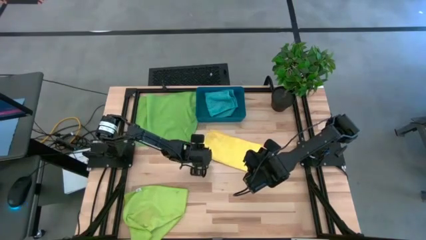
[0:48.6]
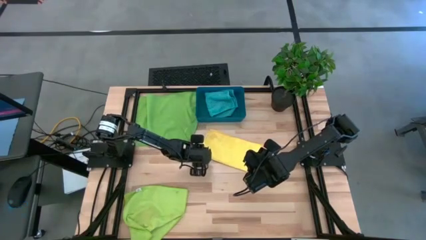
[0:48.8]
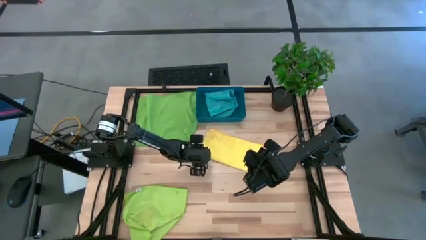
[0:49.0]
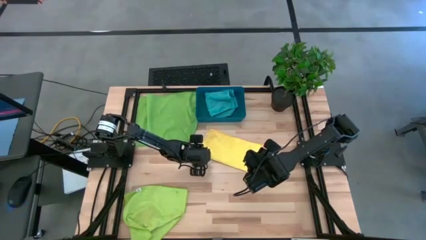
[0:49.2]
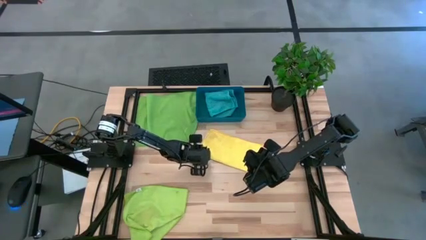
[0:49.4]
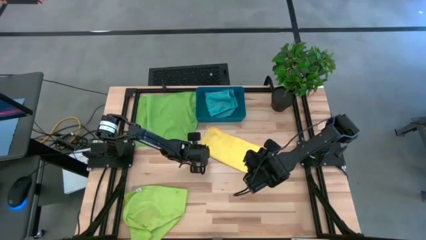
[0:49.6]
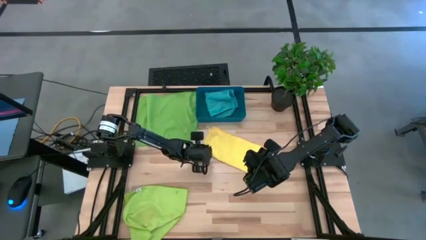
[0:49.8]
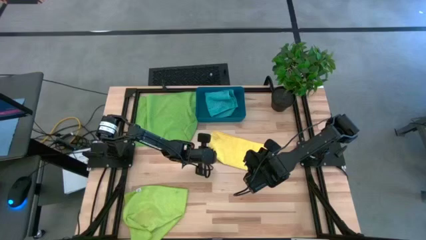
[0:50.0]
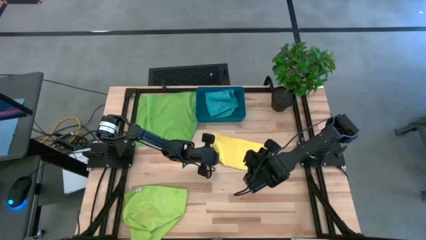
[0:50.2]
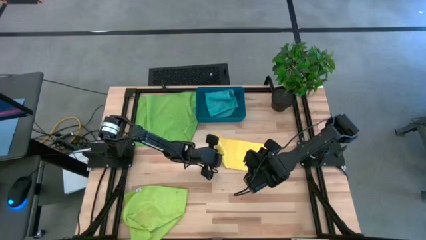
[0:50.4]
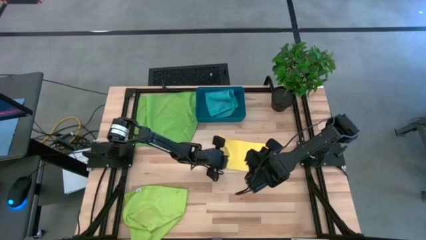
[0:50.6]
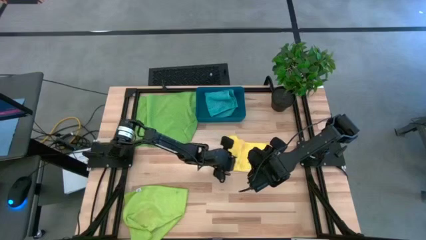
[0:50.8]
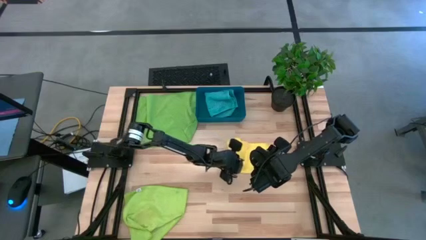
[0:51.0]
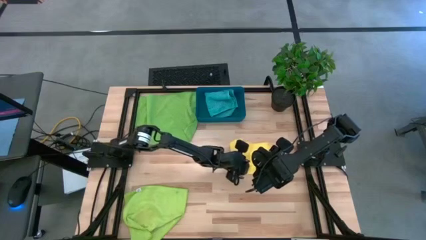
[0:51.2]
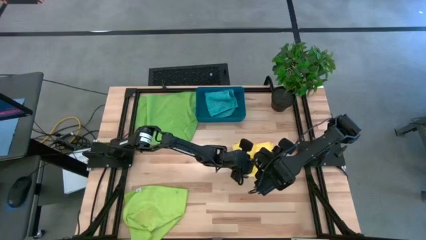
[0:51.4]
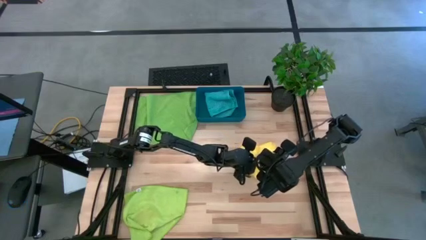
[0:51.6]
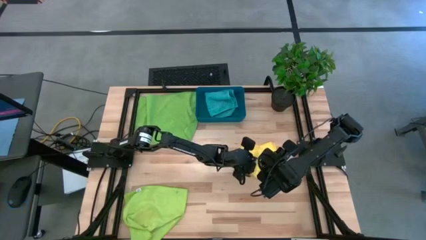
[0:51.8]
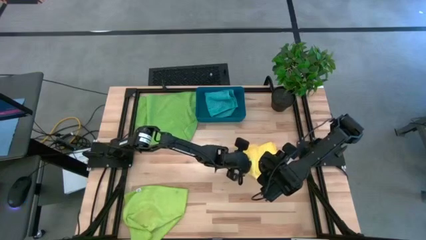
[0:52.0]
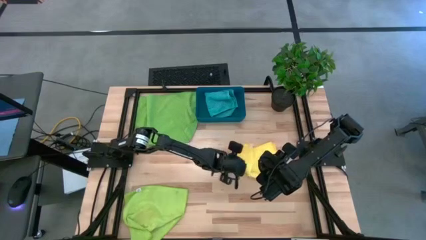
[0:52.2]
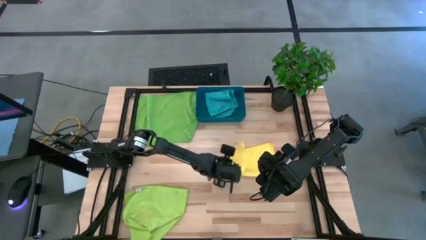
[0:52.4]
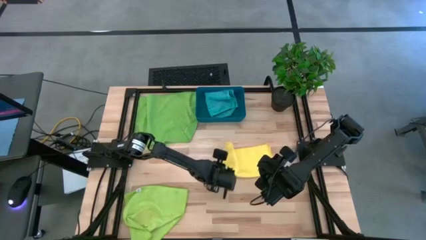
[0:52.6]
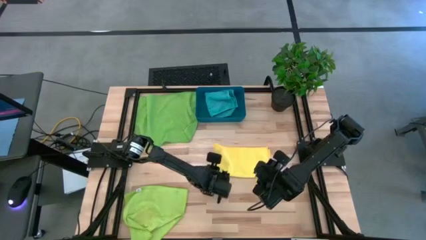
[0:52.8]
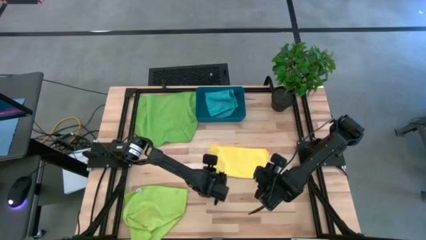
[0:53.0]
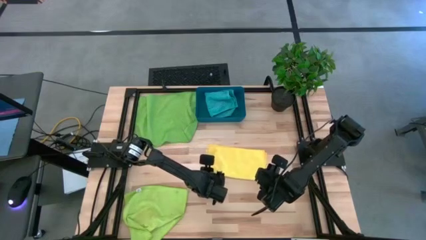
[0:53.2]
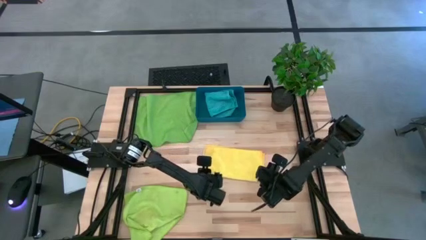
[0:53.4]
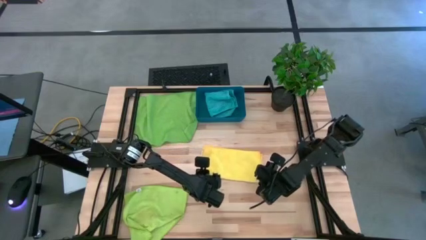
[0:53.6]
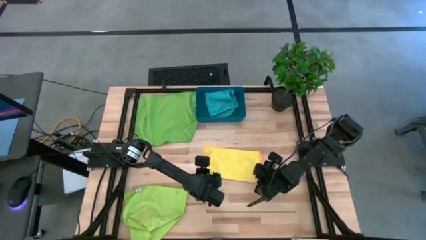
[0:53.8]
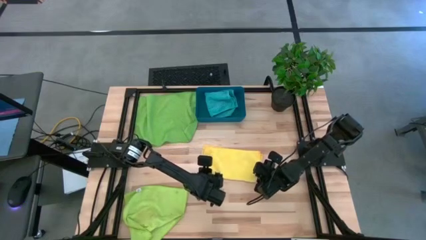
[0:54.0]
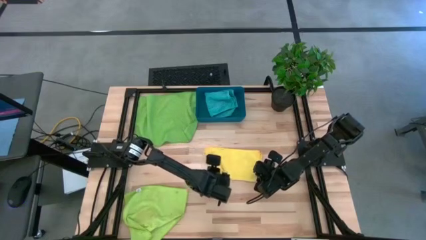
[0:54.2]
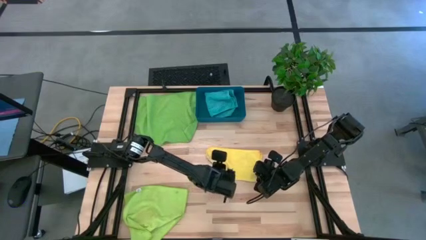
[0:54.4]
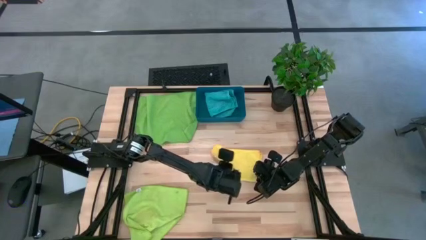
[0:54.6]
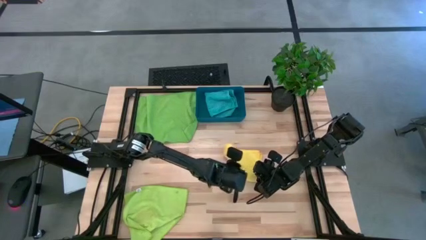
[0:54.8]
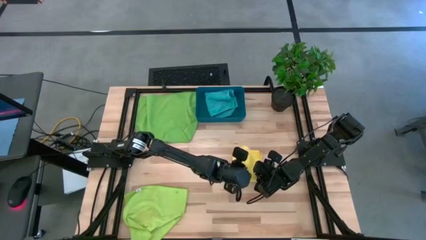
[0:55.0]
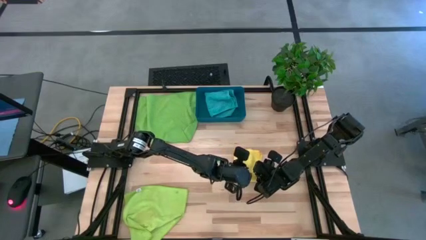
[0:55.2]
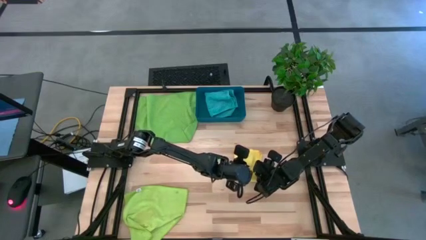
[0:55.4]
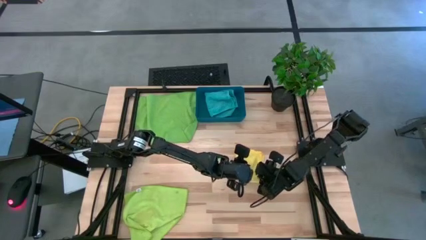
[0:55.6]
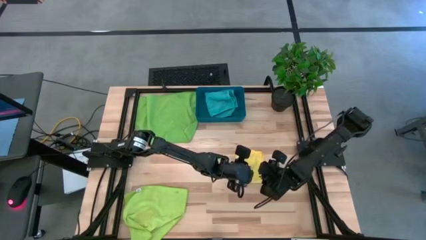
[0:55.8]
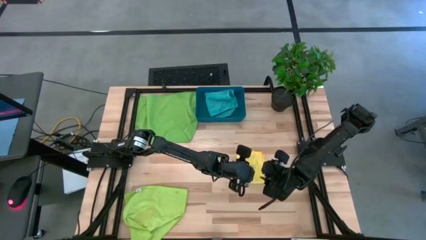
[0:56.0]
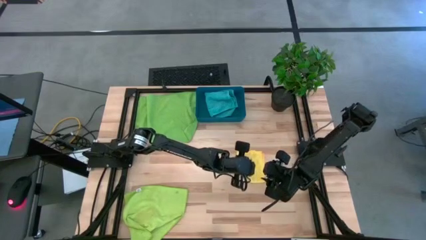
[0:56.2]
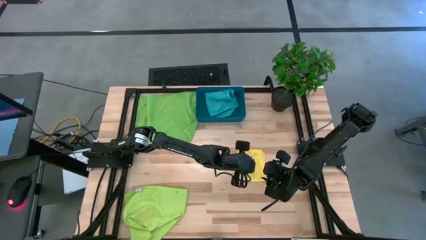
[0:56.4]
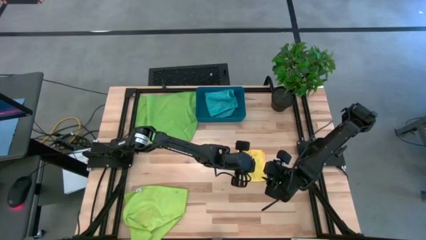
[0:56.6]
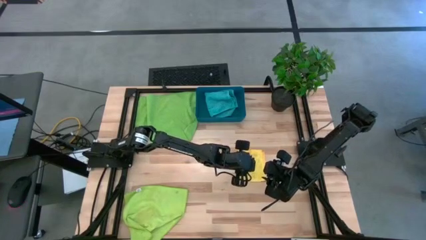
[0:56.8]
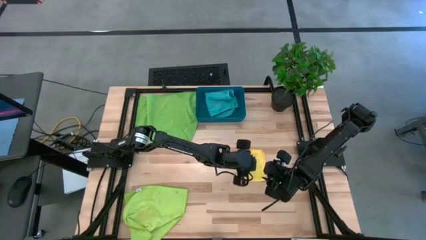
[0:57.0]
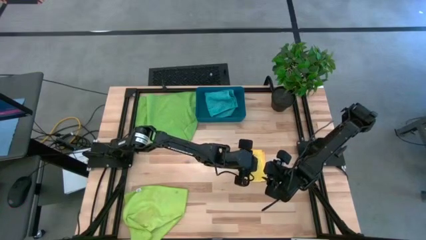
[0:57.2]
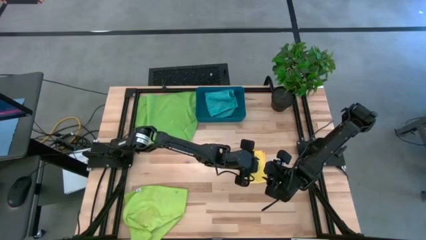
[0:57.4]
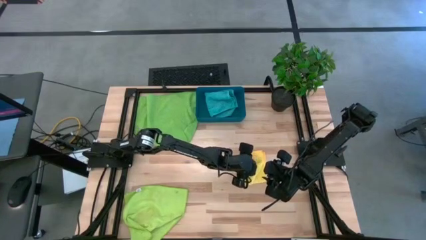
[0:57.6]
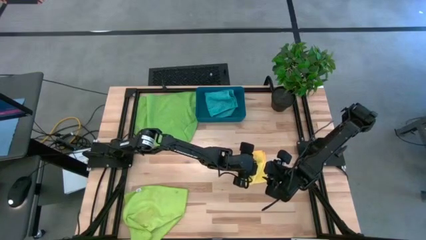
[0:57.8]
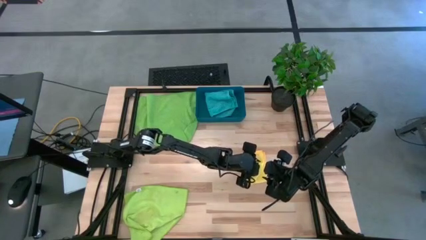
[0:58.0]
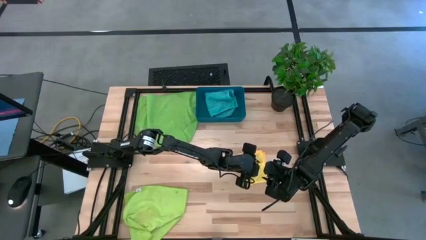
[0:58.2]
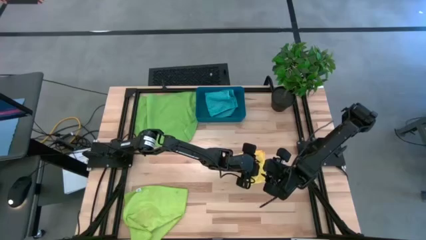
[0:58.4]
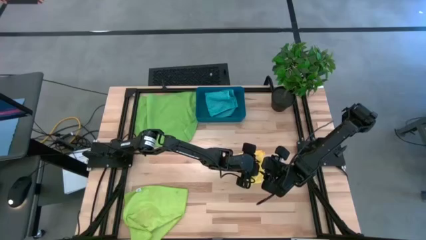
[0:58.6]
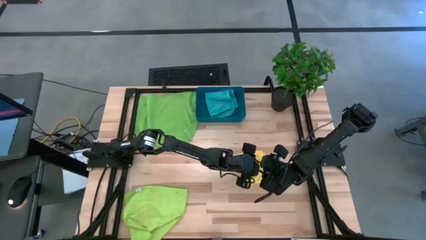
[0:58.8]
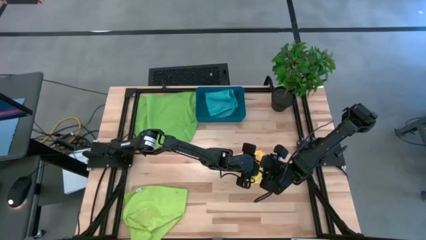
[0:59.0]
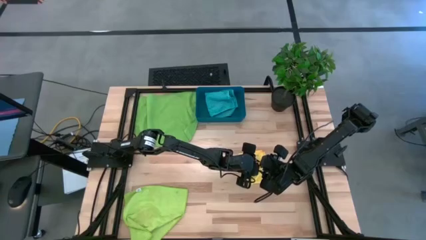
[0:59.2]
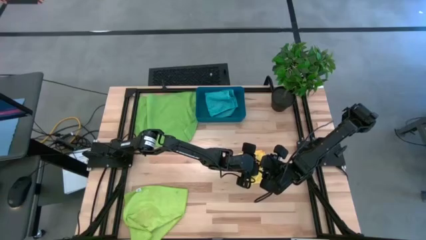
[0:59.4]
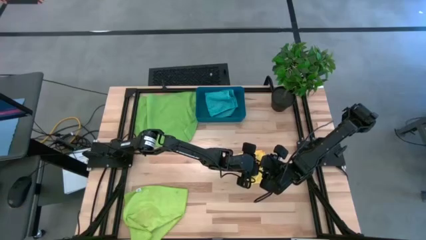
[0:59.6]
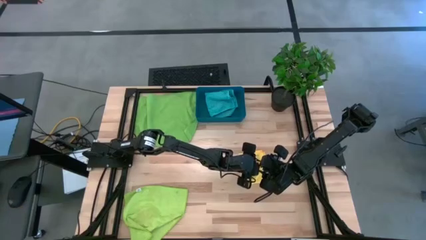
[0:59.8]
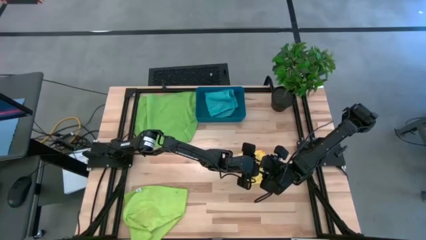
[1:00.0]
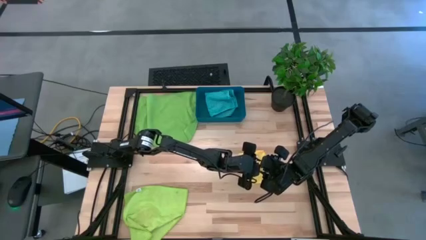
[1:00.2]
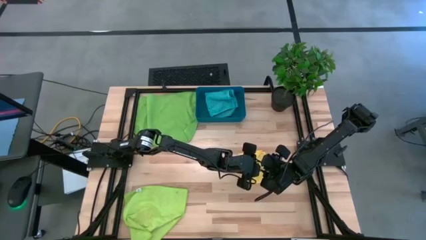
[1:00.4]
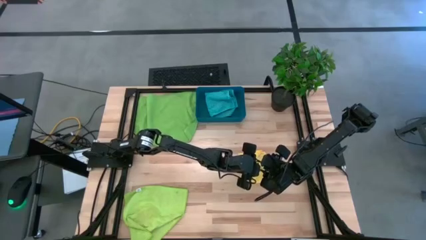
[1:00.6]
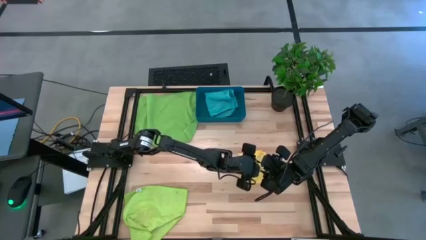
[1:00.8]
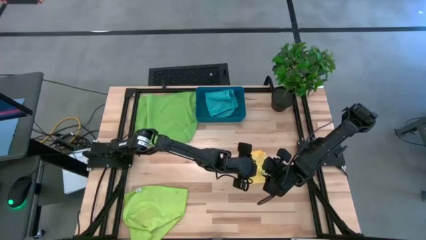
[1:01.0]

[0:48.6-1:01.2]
Task: Fold microfiber towels
Fold the yellow microfiber cloth

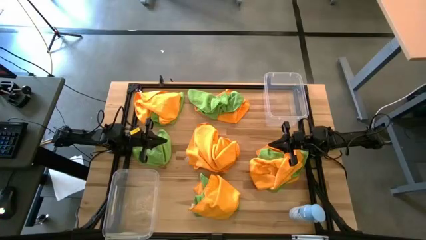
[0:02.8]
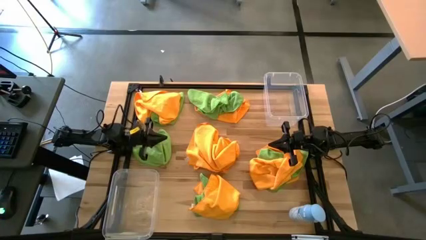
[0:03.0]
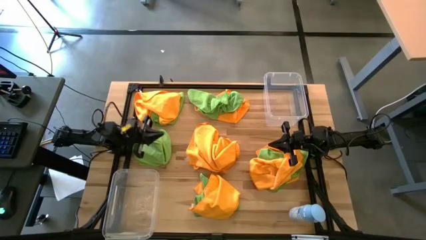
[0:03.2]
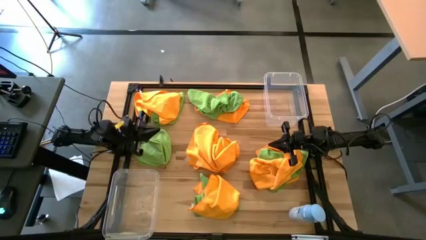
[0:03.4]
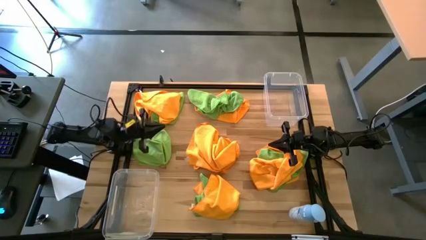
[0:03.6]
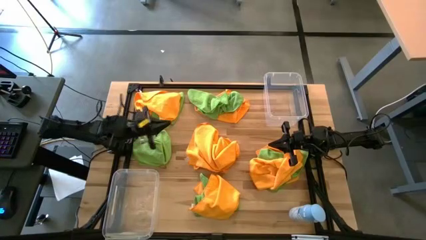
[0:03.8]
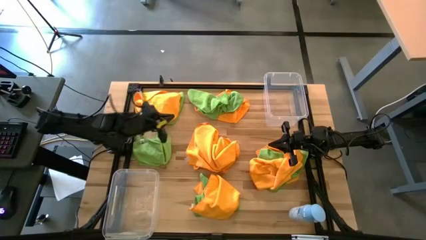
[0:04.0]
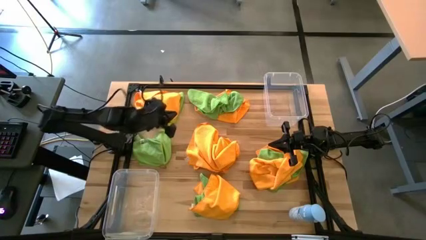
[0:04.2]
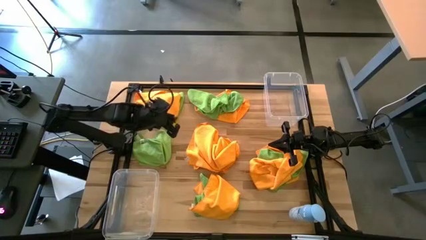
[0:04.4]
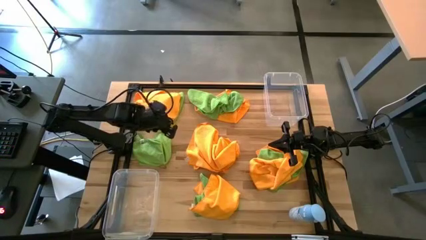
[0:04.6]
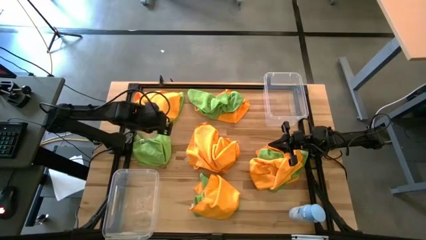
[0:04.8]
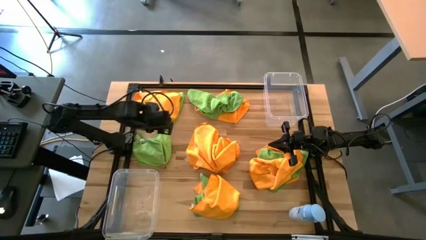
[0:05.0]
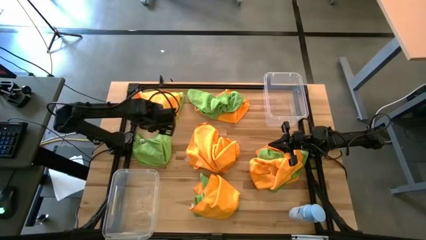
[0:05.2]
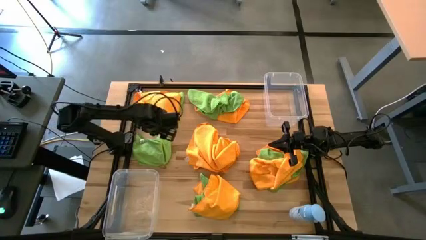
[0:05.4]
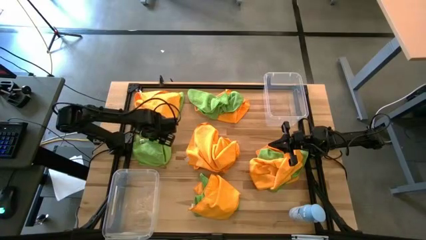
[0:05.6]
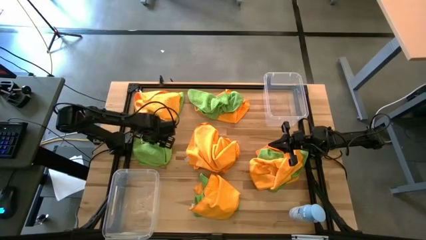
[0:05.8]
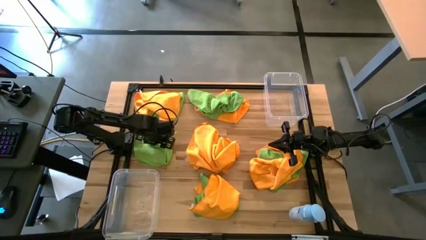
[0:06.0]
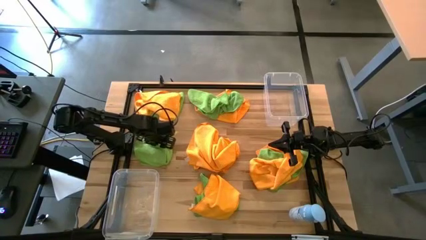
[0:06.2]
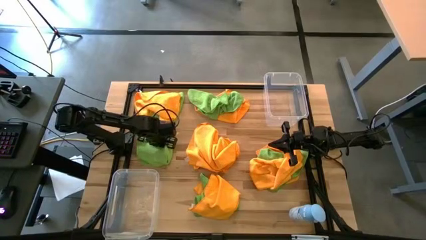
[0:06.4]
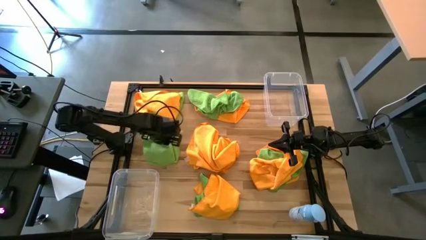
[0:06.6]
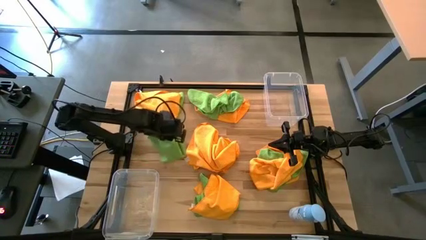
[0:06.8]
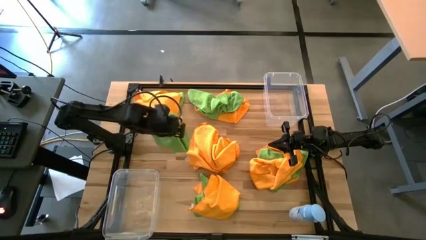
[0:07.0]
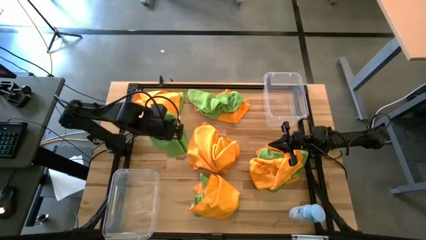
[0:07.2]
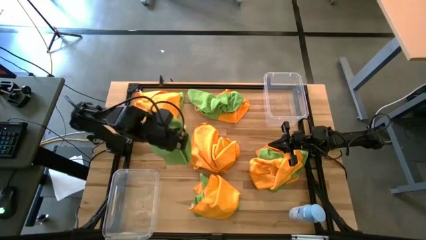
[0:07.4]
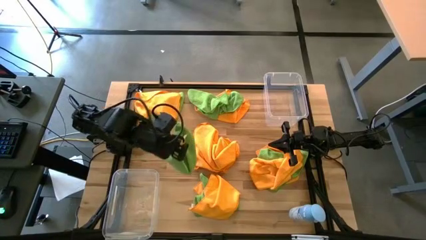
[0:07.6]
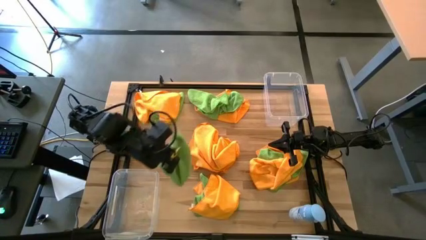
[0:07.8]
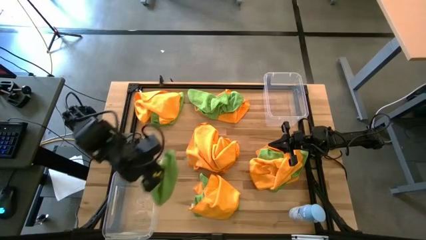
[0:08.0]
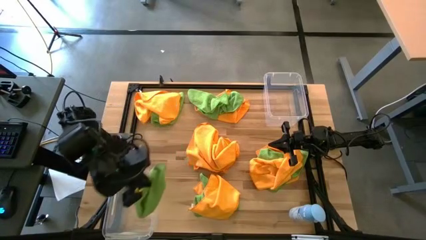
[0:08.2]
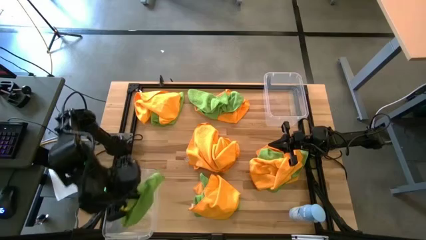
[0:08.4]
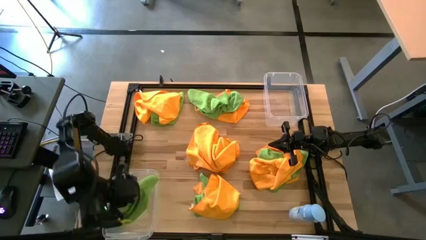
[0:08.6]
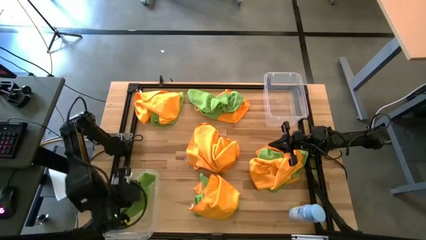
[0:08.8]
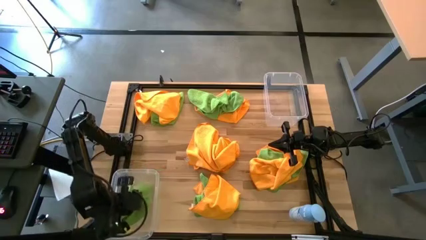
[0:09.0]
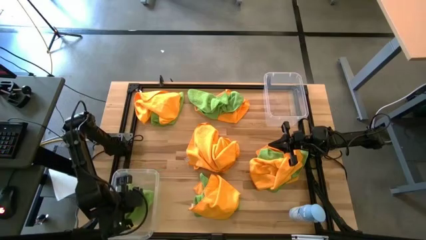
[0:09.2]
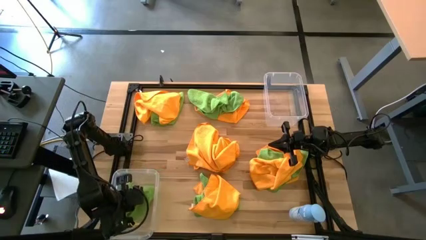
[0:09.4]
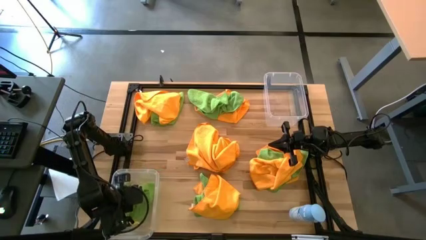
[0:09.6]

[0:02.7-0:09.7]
Task: Sort microfiber towel by color & place in baskets
Put the green microfiber towel into the bottom transparent bin
